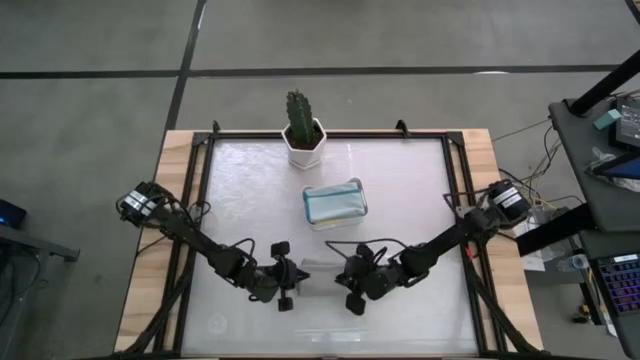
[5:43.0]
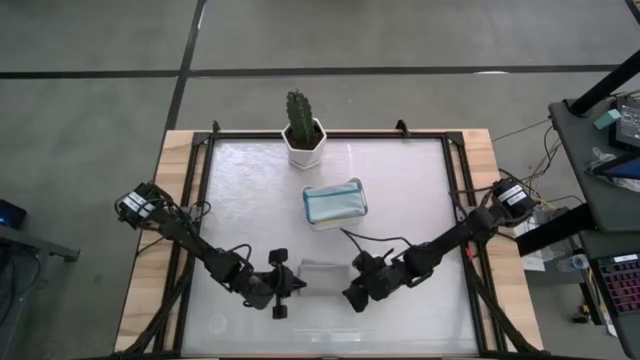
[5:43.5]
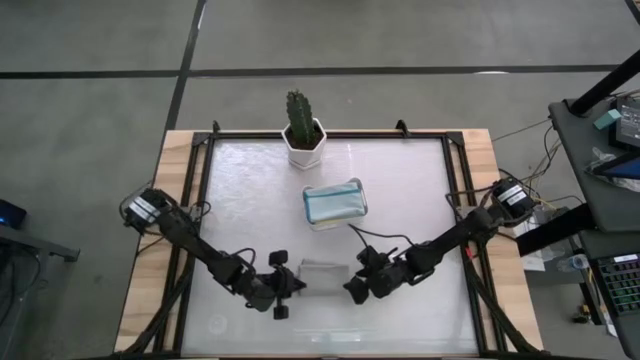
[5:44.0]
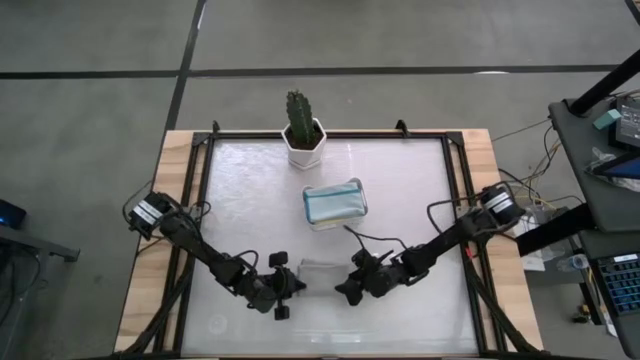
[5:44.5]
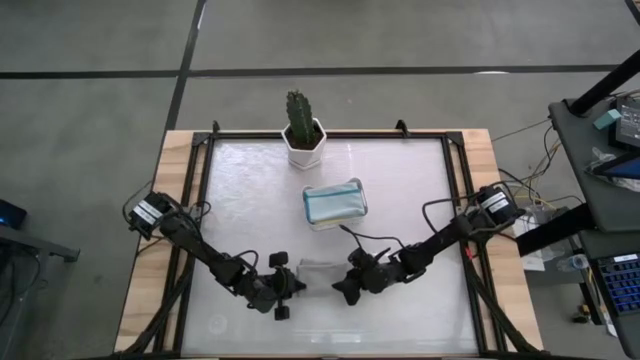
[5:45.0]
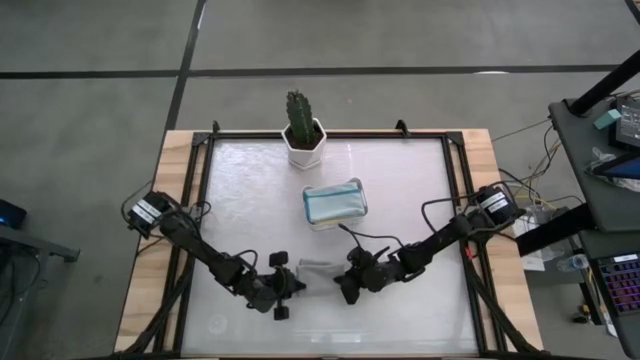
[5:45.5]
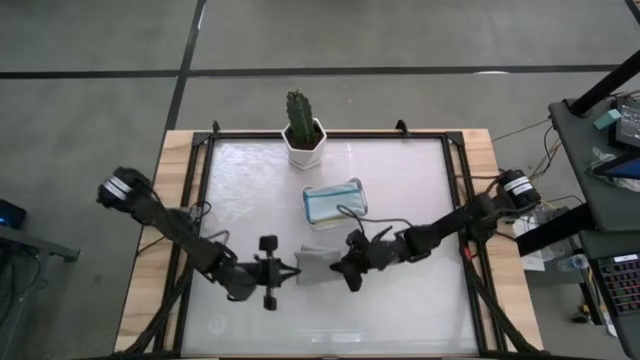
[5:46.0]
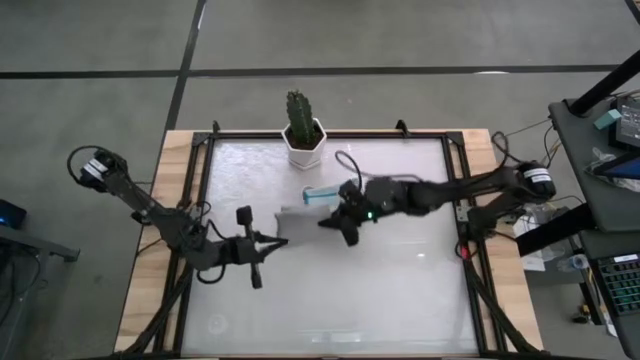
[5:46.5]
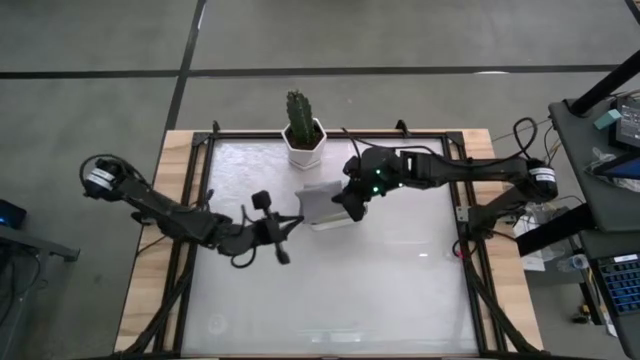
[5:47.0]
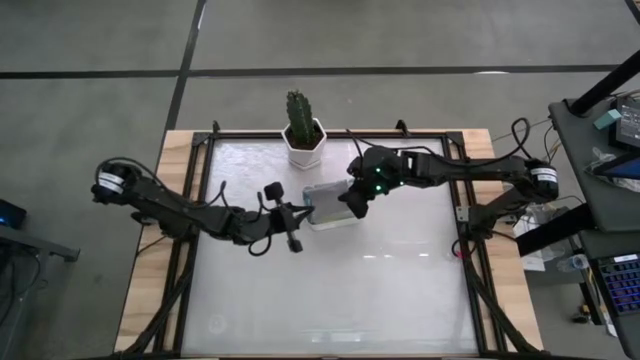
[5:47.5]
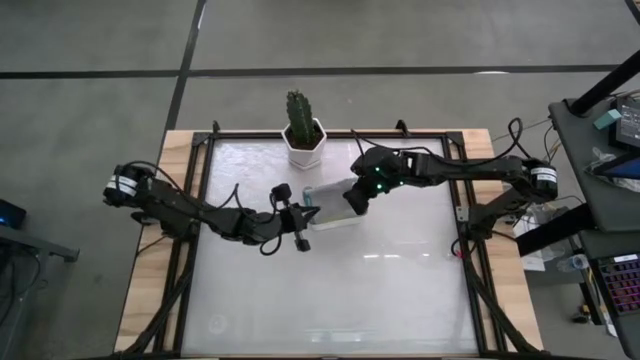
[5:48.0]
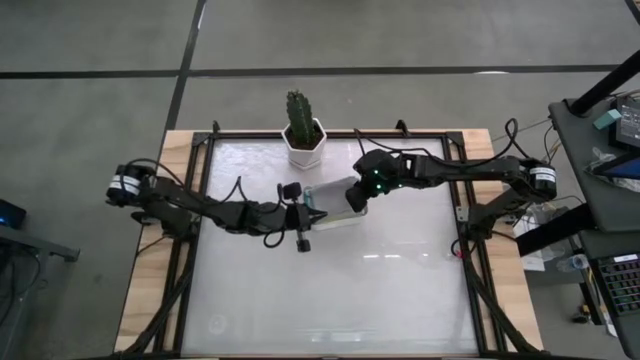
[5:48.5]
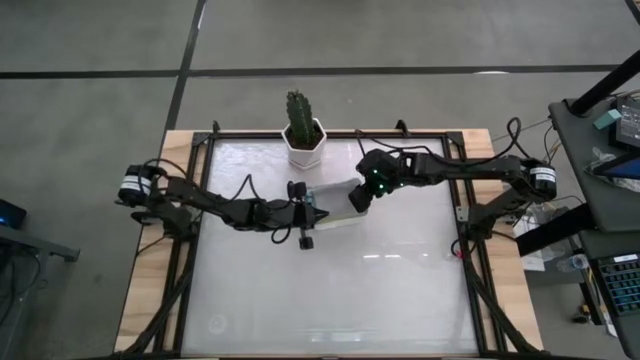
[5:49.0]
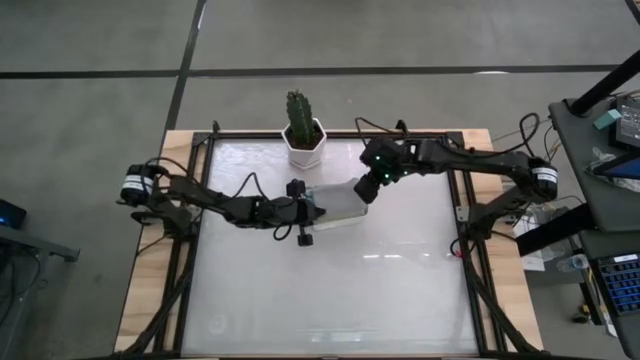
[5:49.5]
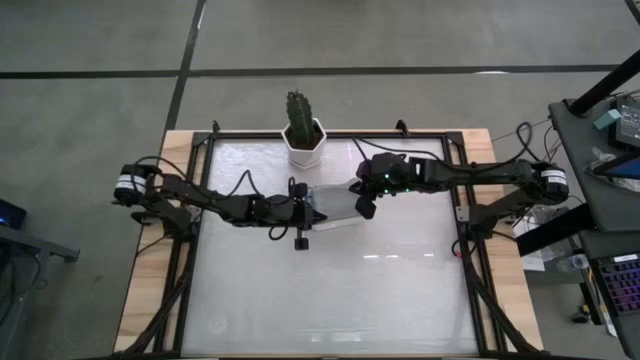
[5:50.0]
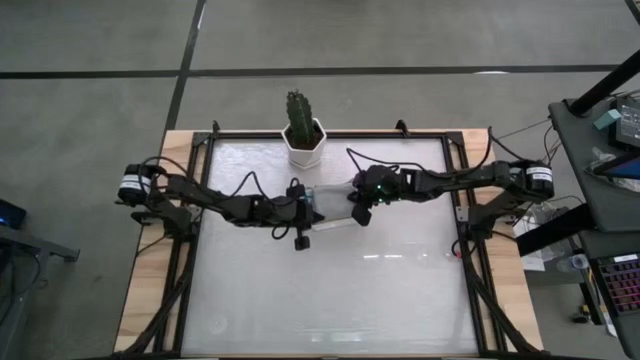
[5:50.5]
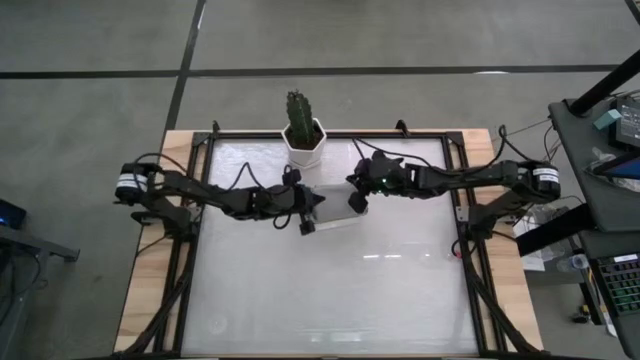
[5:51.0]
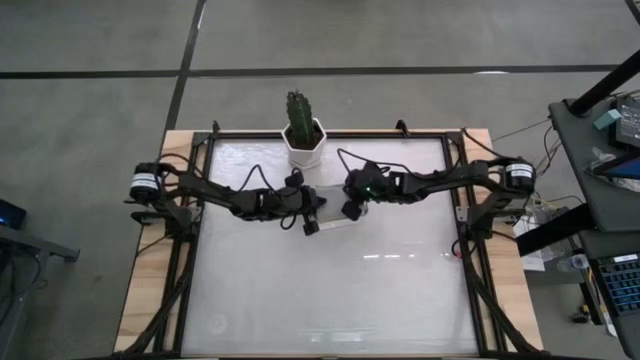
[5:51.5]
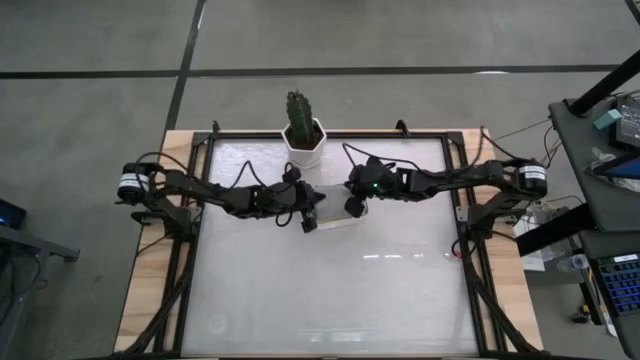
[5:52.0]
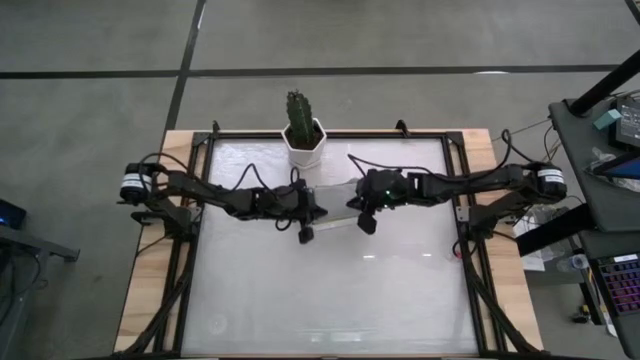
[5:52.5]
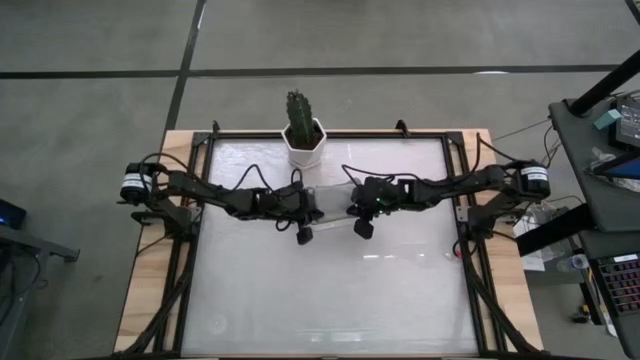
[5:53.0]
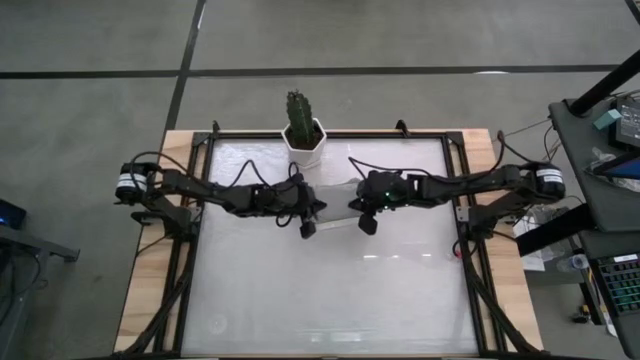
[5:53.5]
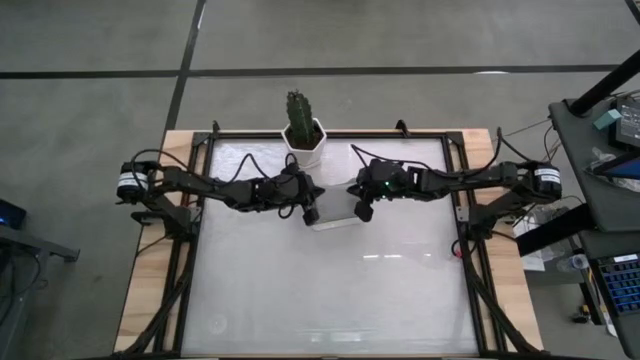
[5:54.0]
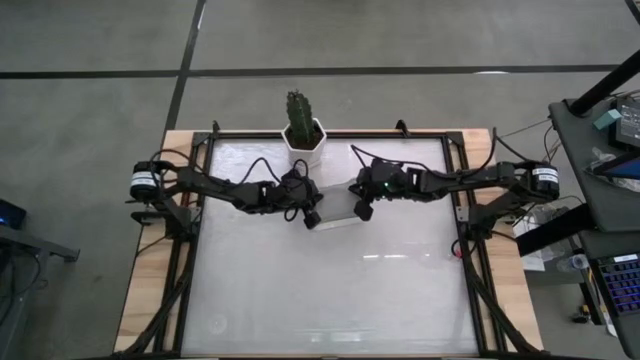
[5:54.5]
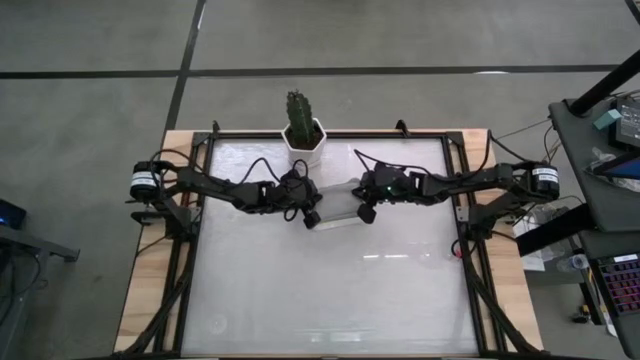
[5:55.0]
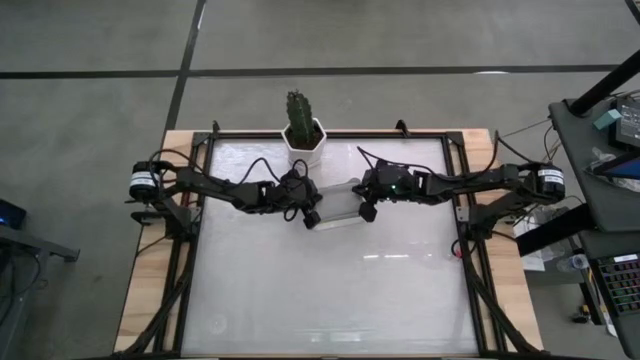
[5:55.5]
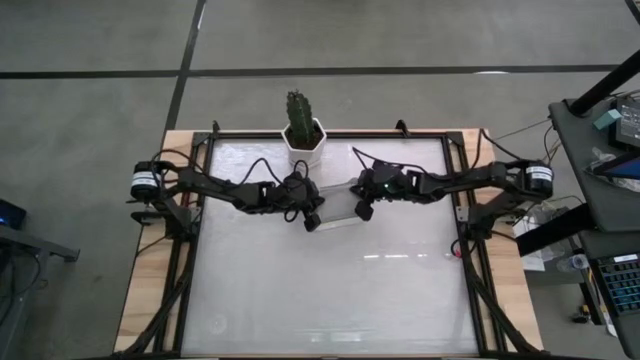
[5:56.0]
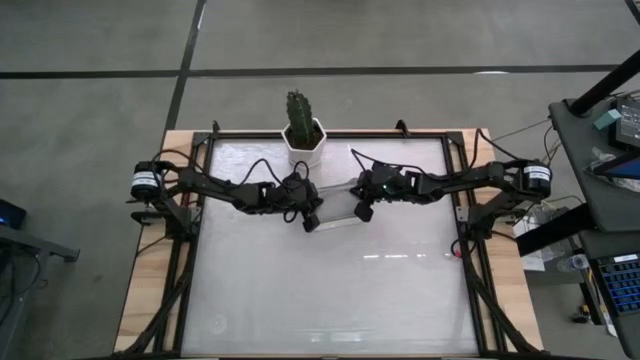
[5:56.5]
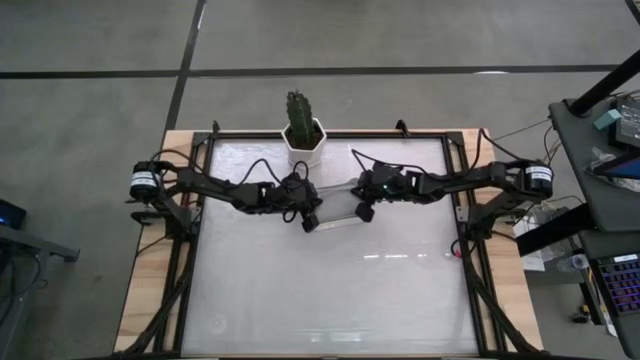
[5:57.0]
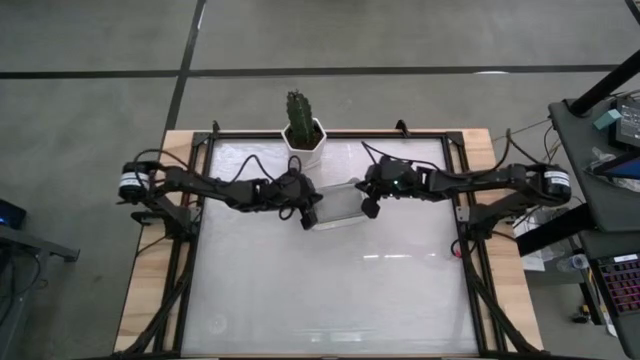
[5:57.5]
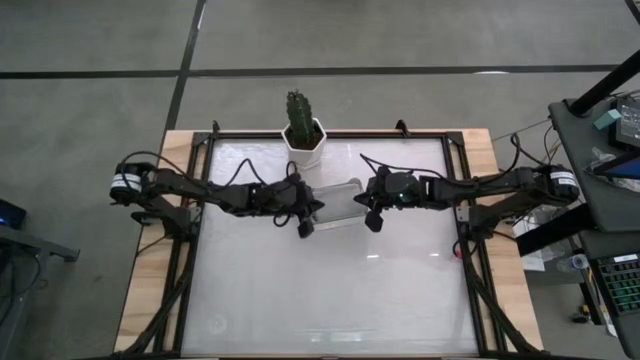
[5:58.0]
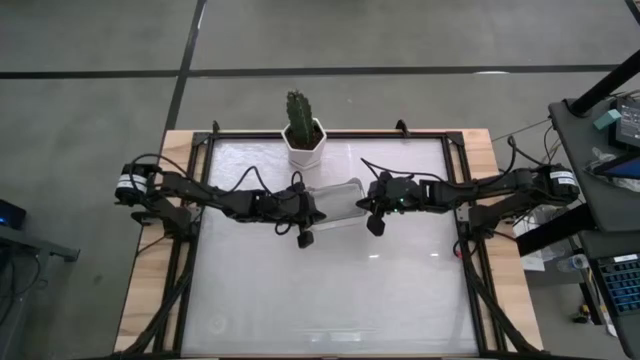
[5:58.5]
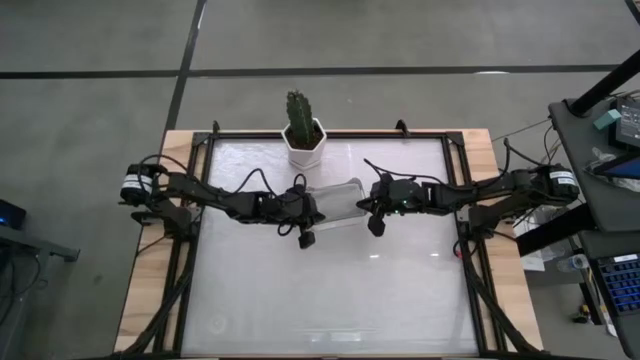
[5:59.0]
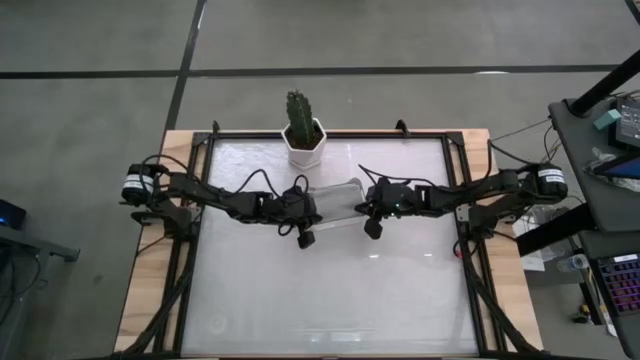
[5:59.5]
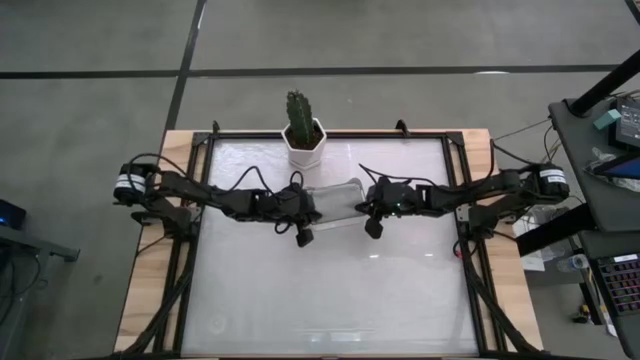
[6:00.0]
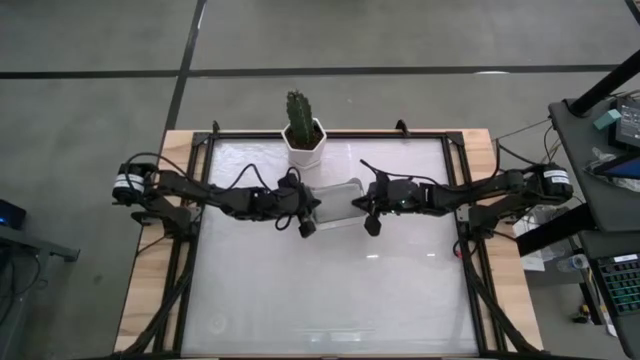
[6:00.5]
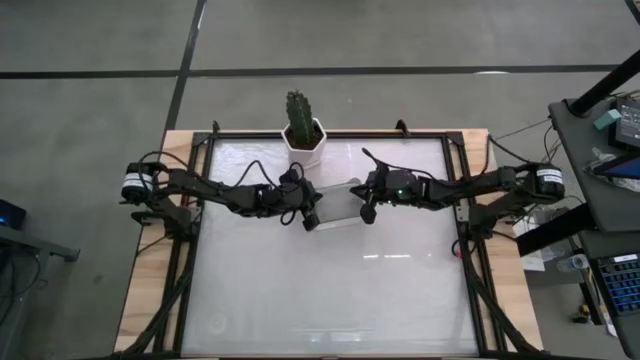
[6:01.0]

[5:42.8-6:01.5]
Task: Fold microfiber towels
Put the gray towel into the bin

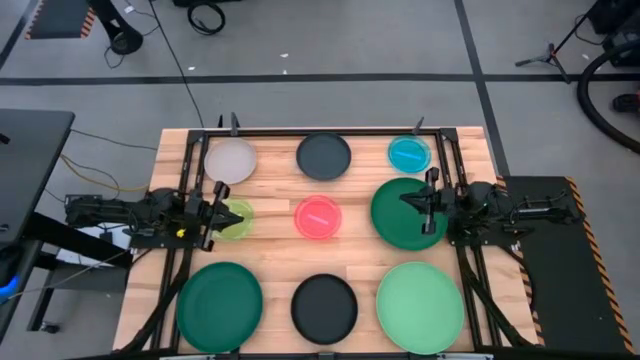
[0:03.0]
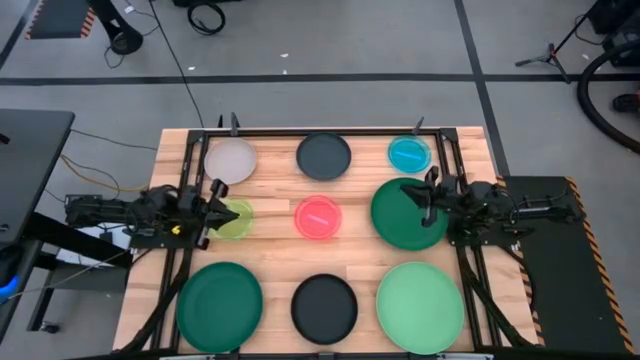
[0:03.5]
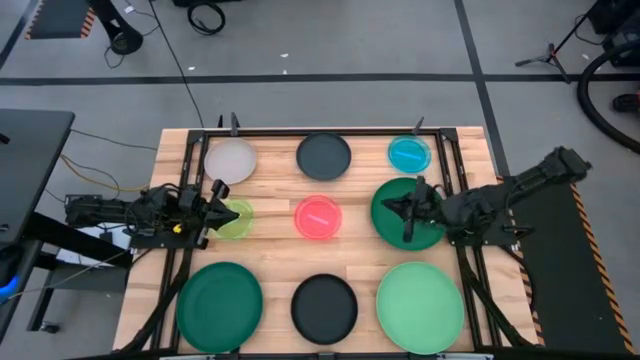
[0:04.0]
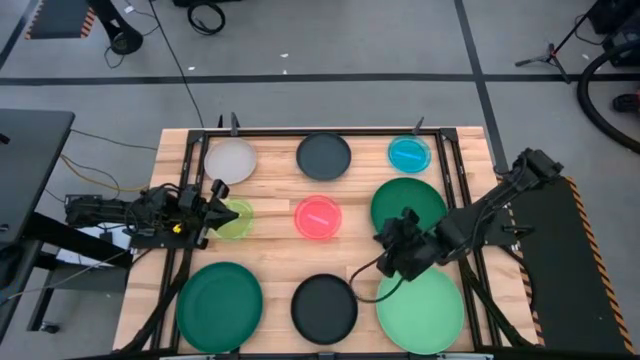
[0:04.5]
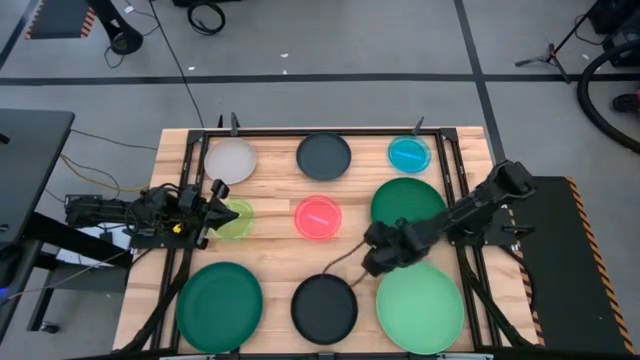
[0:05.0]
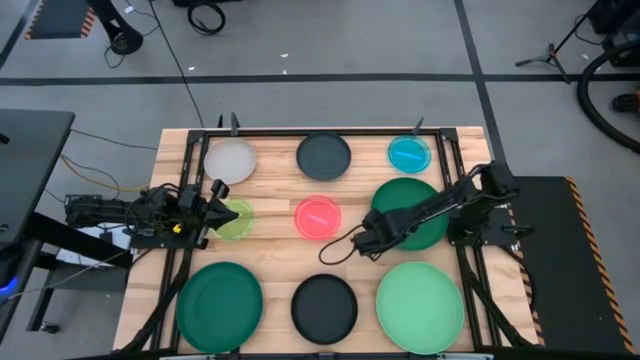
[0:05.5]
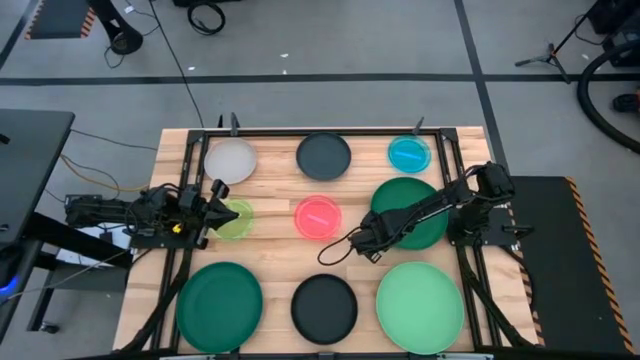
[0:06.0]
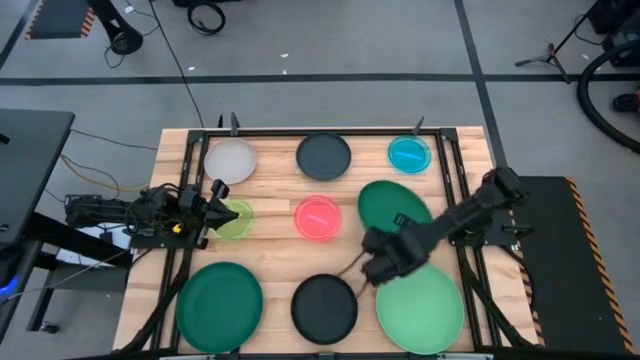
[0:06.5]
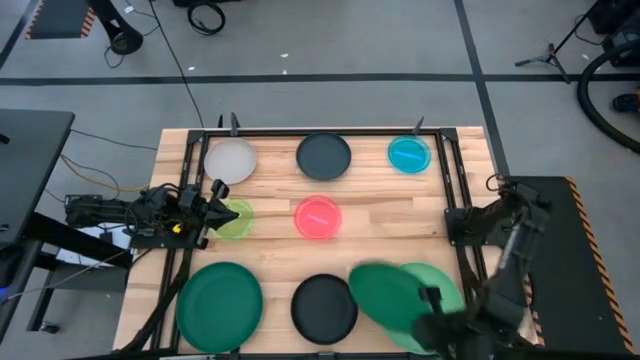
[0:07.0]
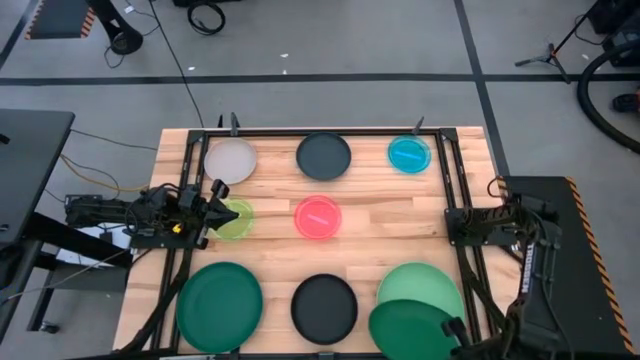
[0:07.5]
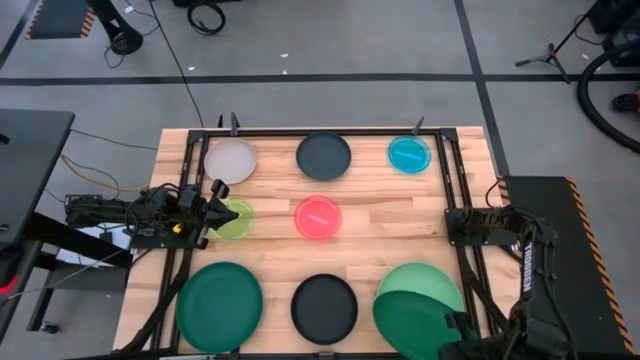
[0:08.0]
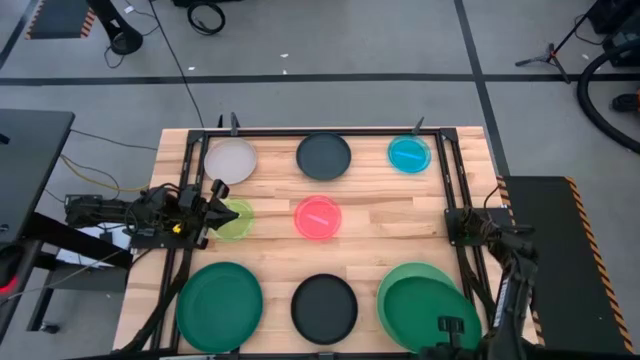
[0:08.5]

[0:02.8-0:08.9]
Task: Stack plastic plates
Stack the green plate on top of light green plate
